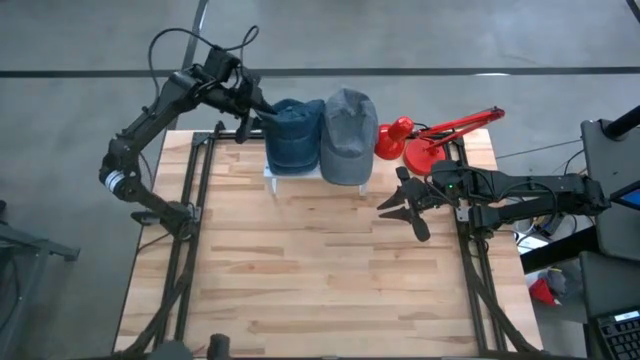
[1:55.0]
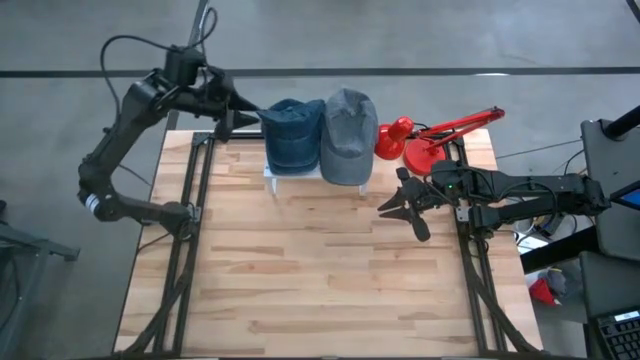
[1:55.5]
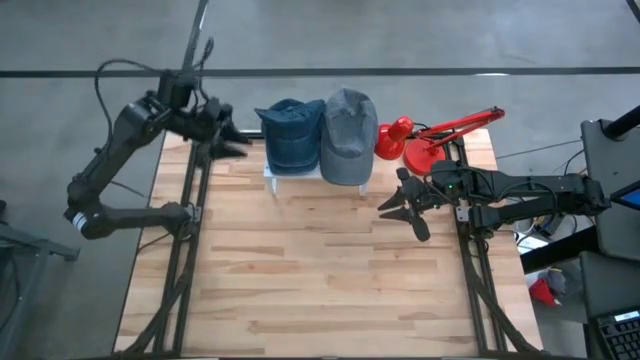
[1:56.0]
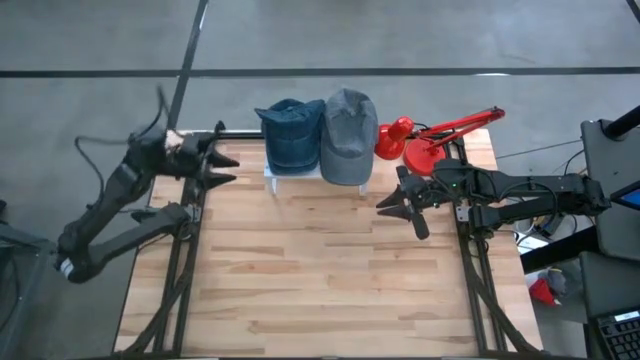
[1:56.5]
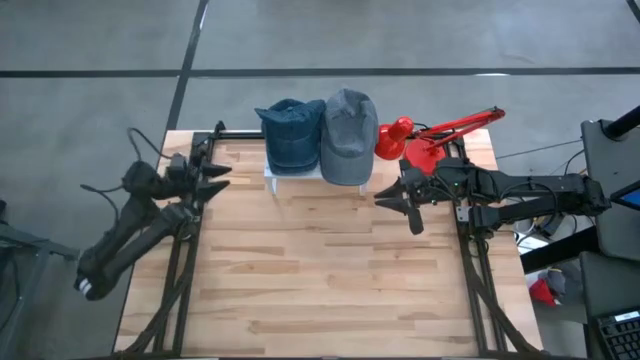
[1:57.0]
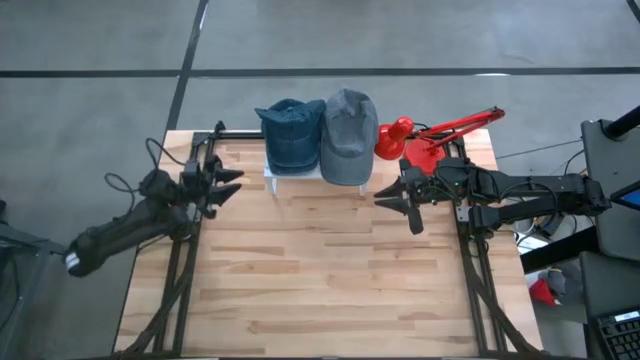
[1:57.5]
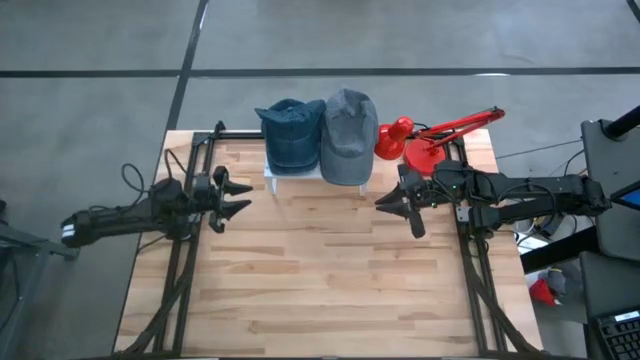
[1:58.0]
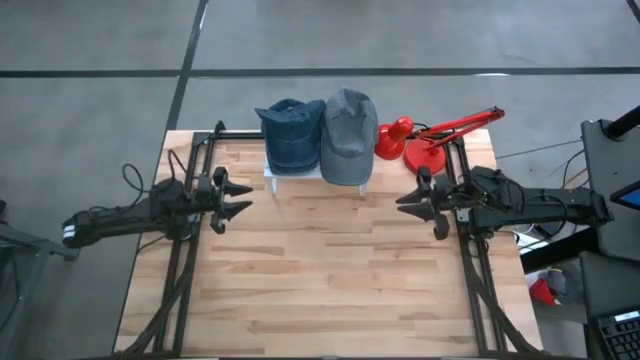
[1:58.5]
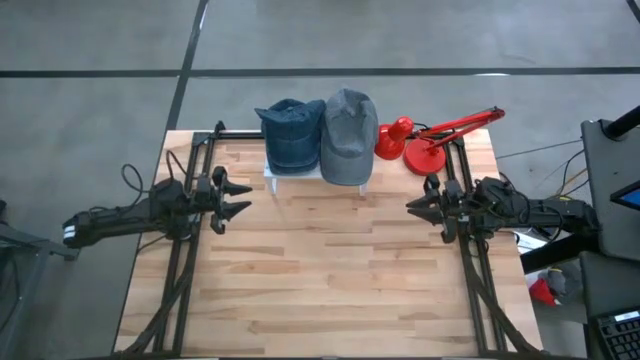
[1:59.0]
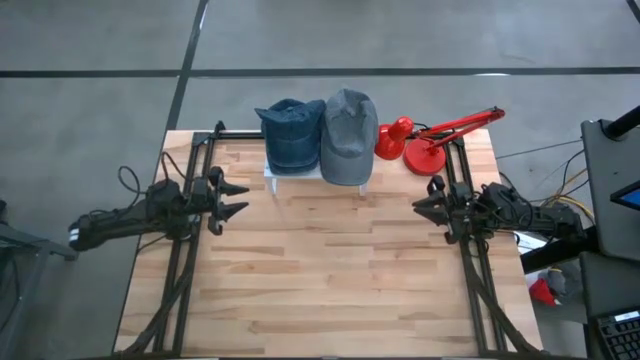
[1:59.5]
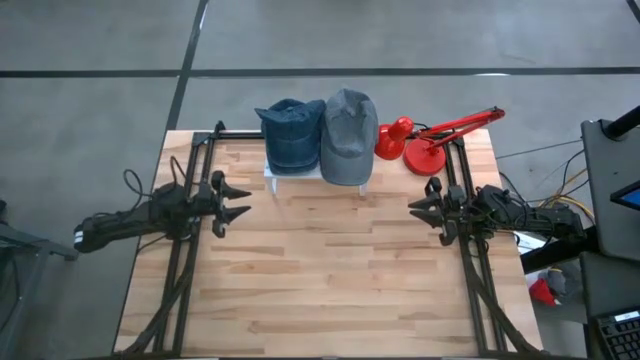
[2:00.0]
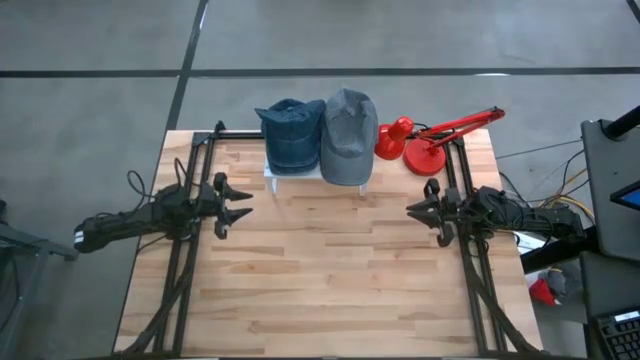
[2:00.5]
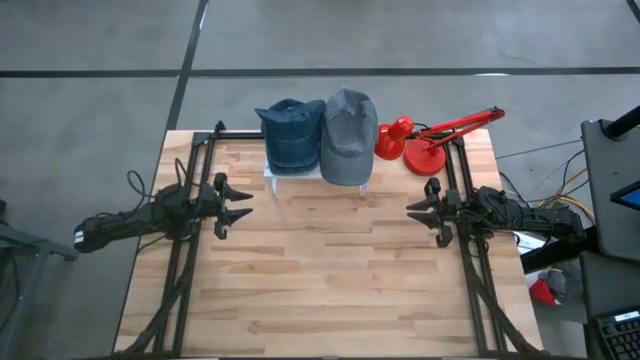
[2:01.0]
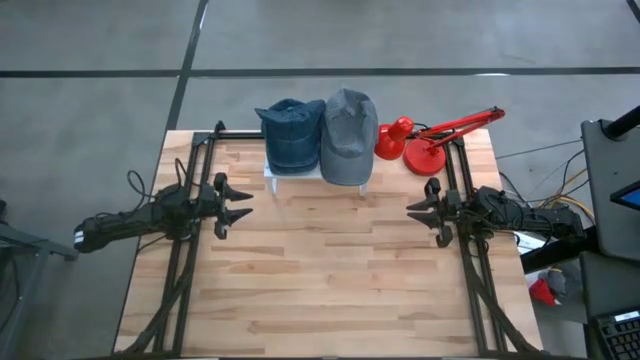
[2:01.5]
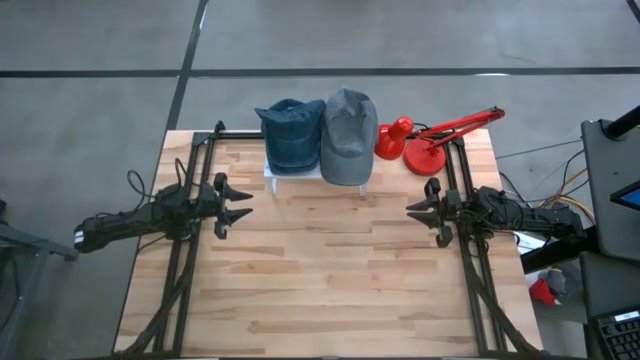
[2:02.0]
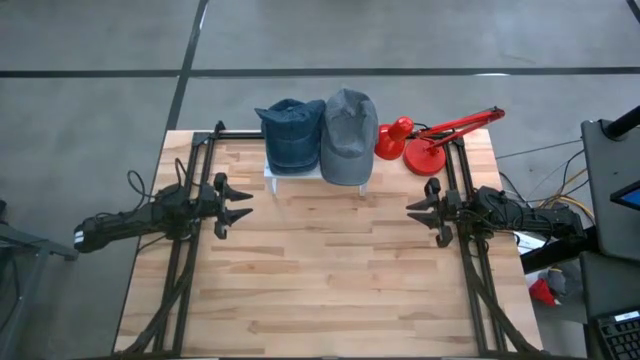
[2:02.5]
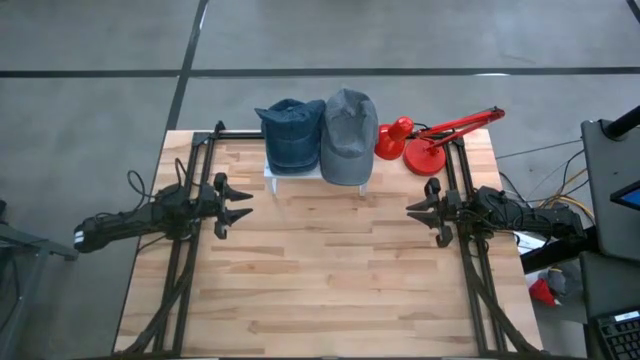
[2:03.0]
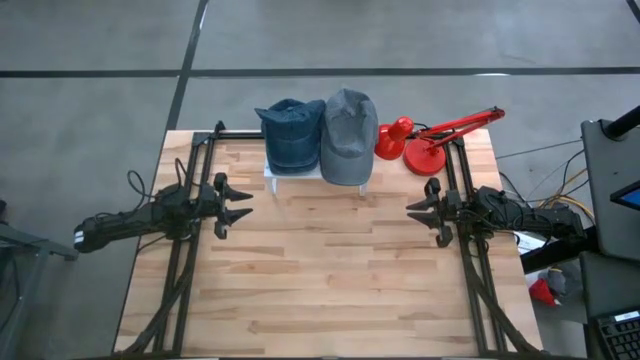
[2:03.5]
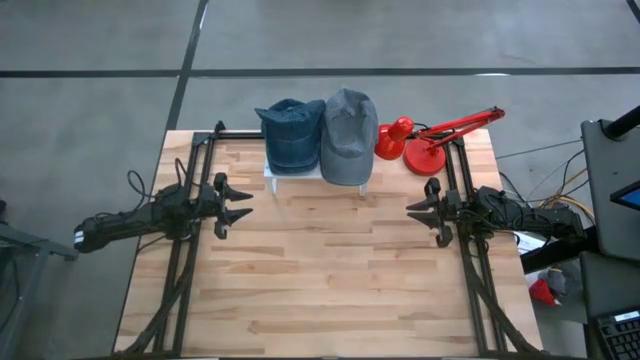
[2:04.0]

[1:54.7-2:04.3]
Task: Pick & Place hat
Return to Home Position

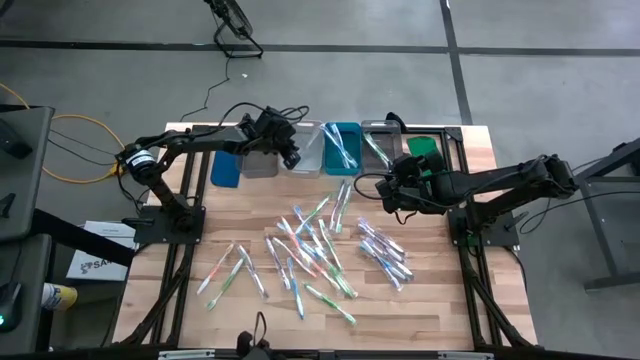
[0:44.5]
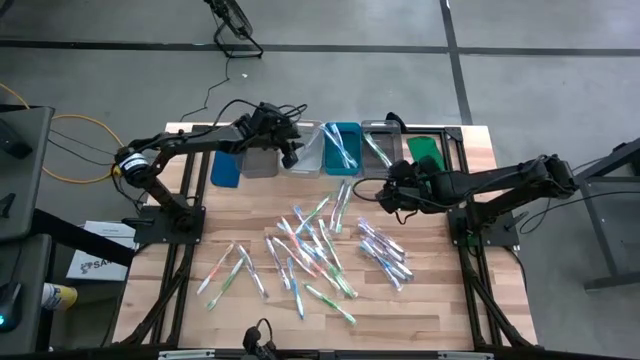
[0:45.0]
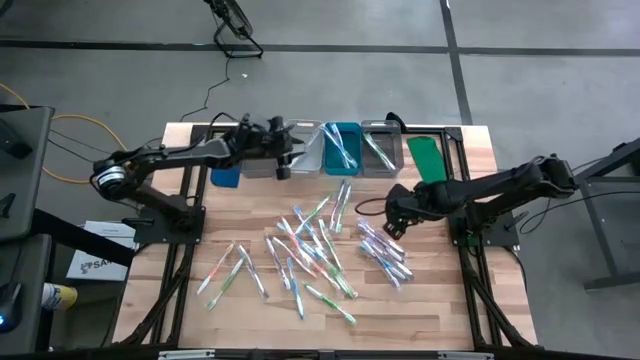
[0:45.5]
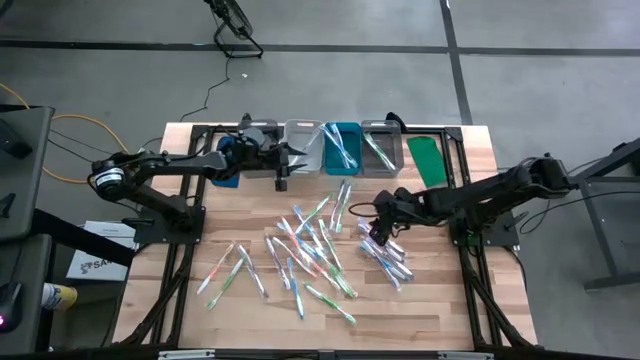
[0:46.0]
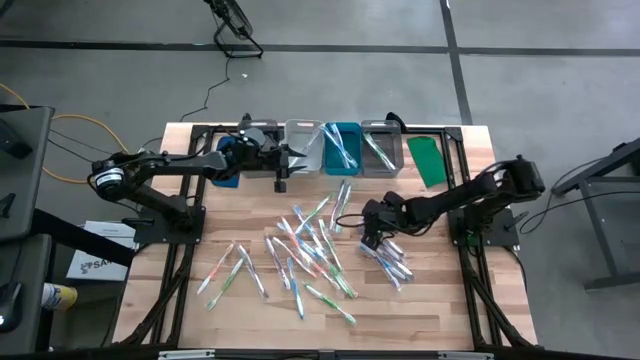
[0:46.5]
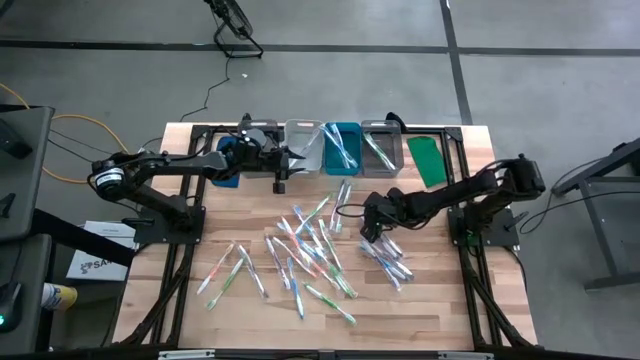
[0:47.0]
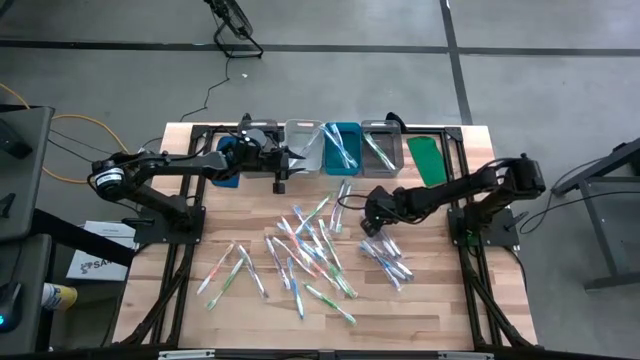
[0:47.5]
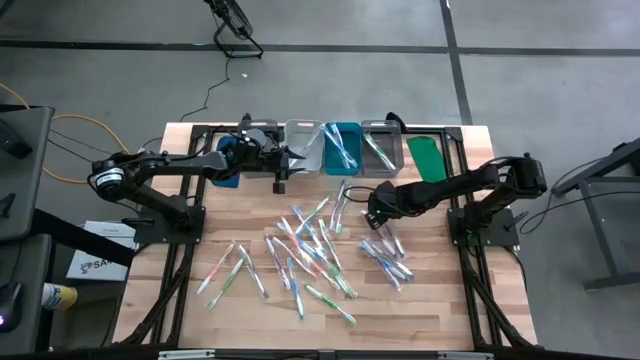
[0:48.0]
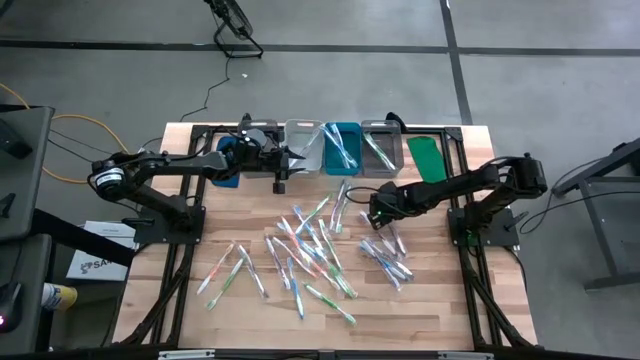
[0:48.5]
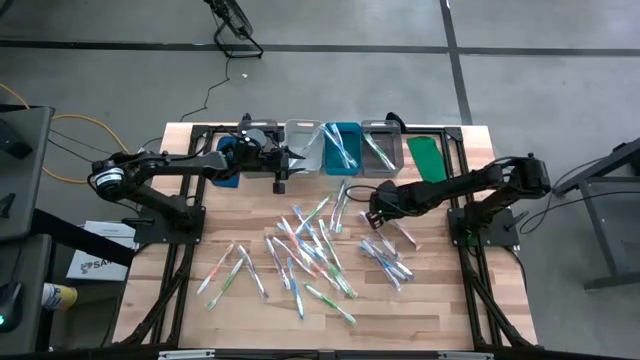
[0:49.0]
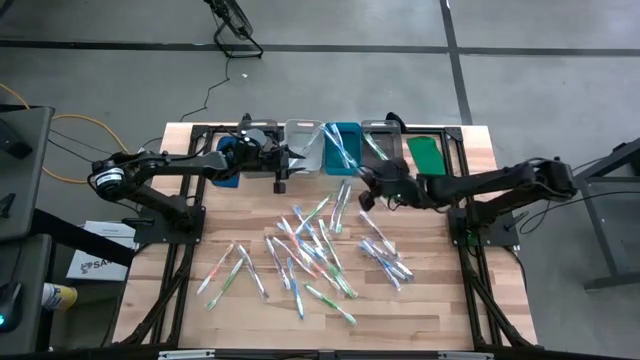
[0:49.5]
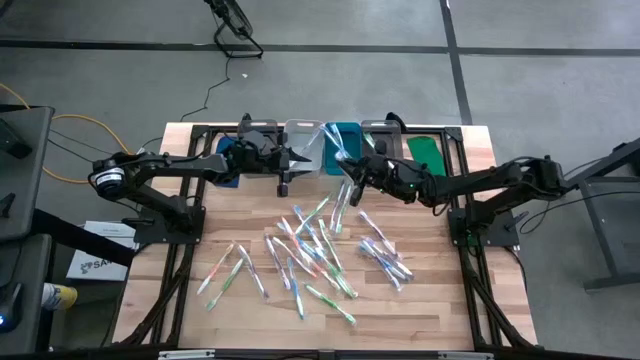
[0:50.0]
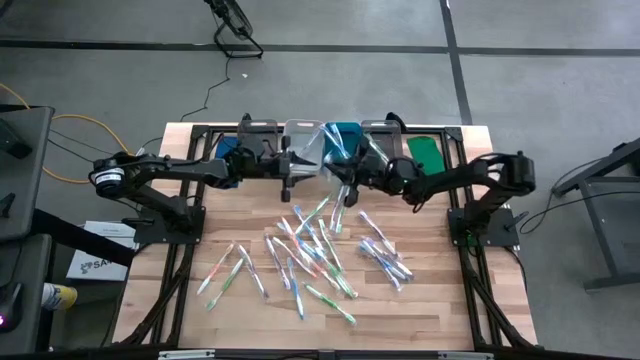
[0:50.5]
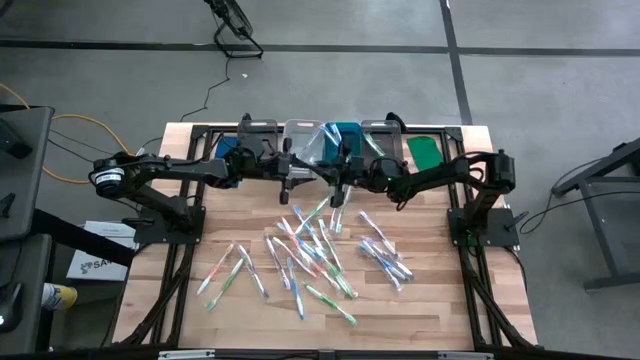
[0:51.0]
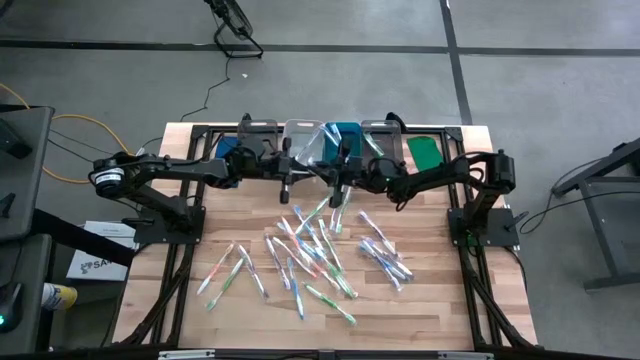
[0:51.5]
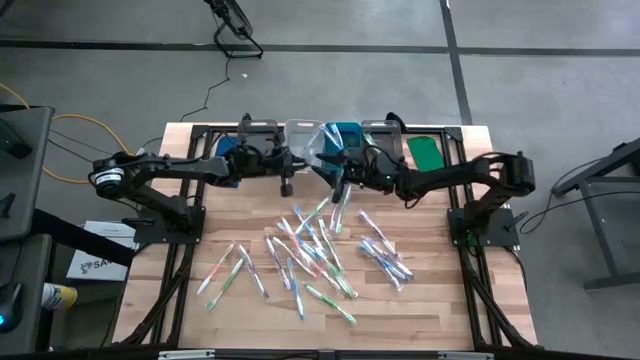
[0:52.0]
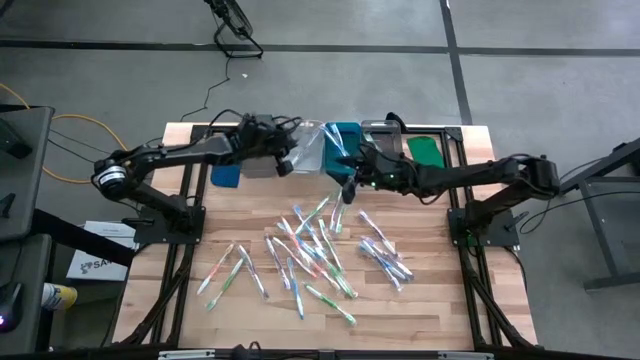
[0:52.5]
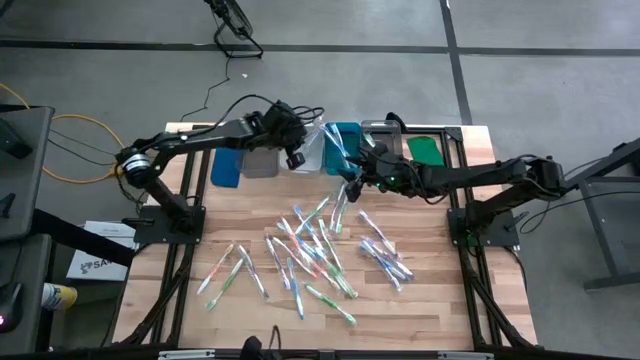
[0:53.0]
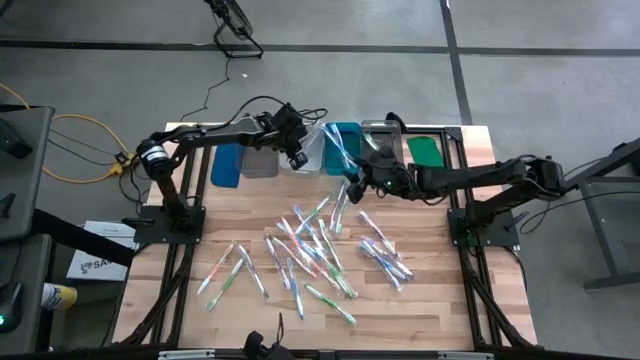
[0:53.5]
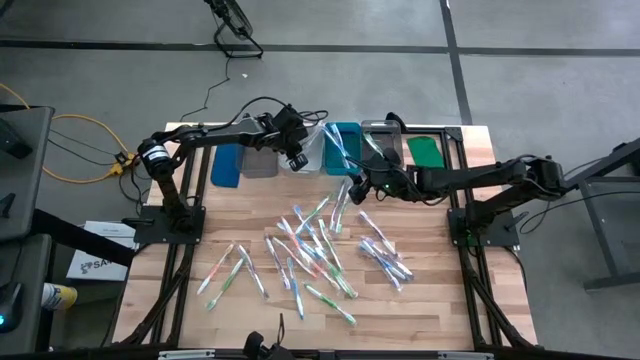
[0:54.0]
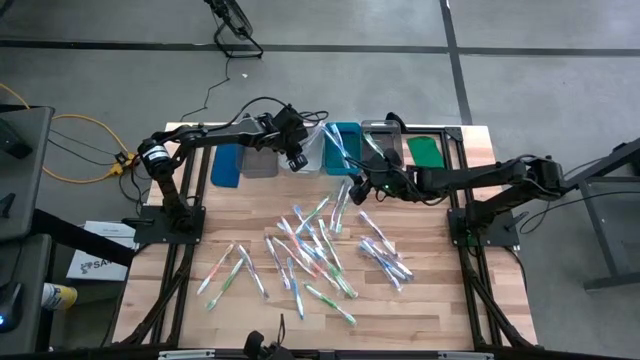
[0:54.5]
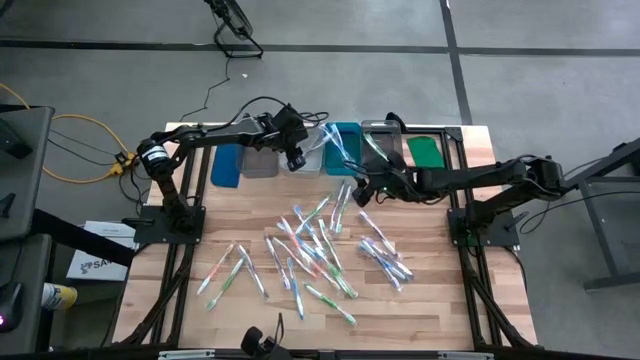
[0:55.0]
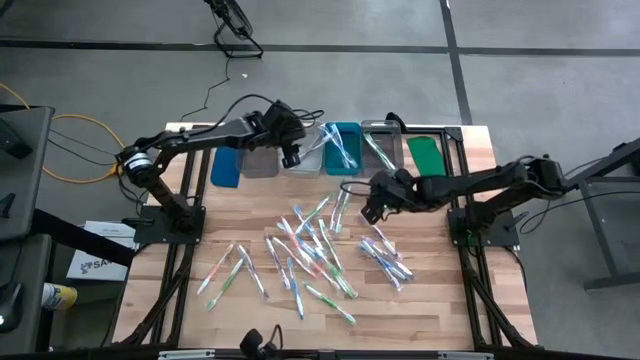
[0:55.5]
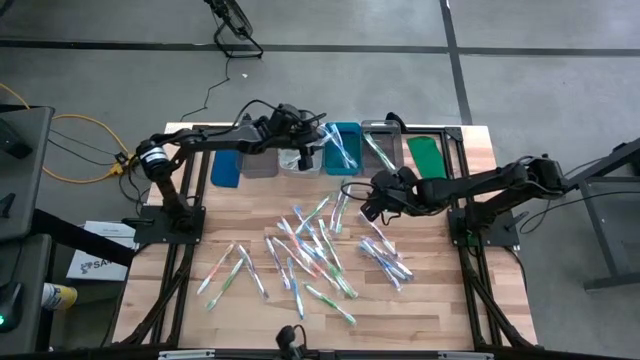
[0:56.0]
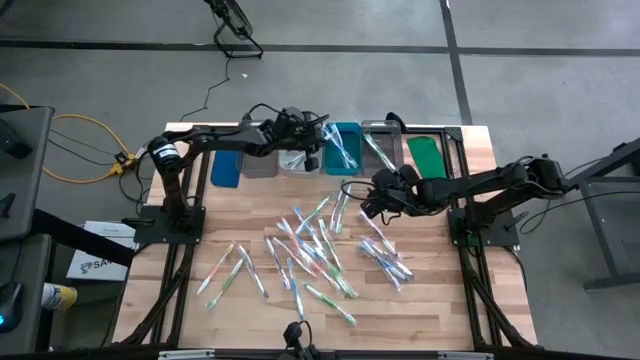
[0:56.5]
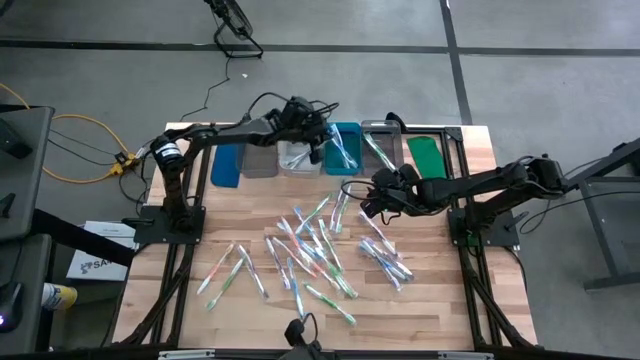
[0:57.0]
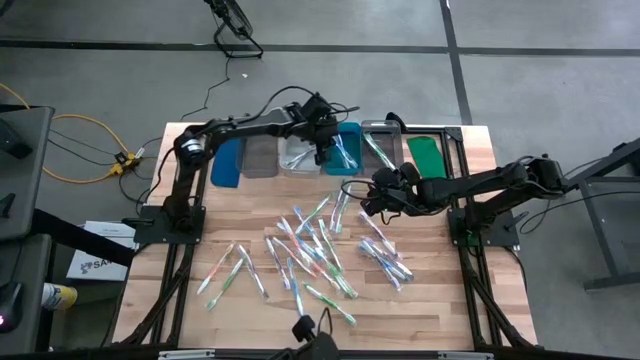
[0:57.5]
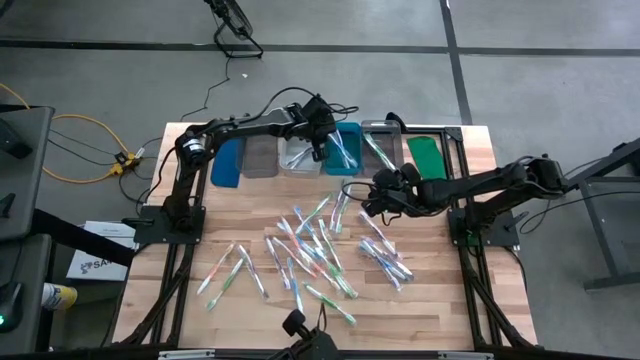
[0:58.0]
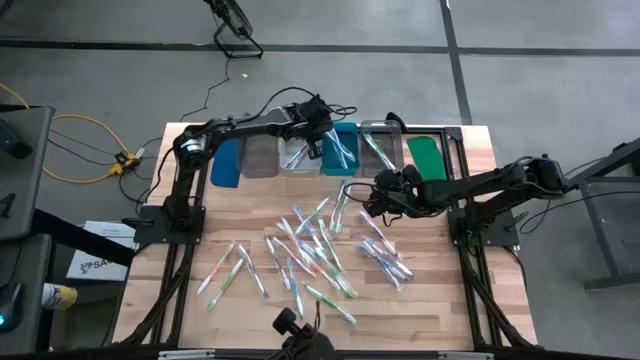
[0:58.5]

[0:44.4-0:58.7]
Task: Pick & Place Toothbrushes
Put the violet toothbrush into the gray bin
